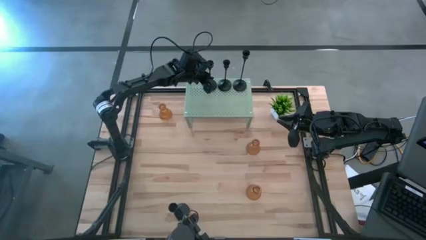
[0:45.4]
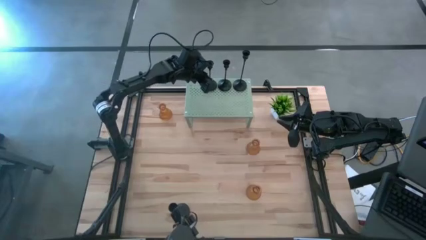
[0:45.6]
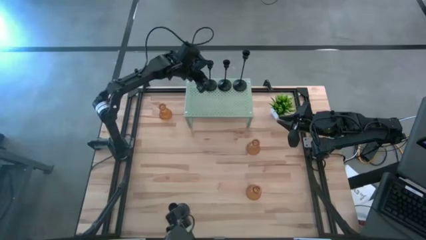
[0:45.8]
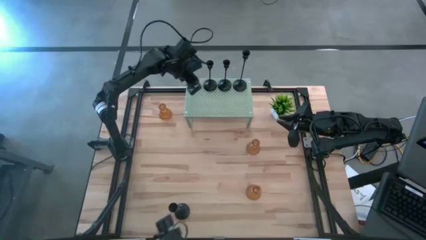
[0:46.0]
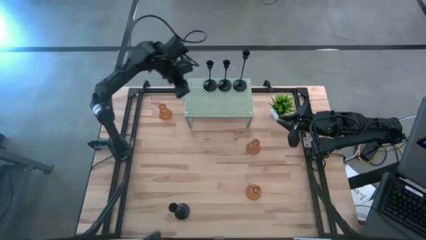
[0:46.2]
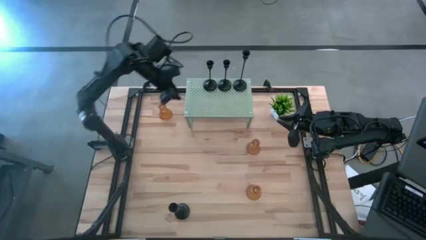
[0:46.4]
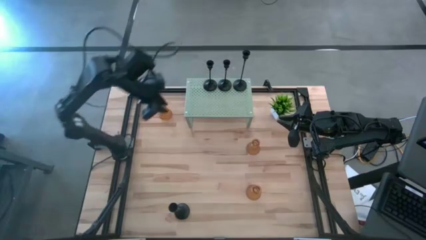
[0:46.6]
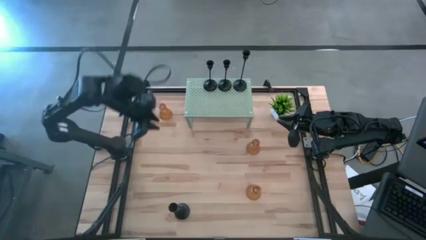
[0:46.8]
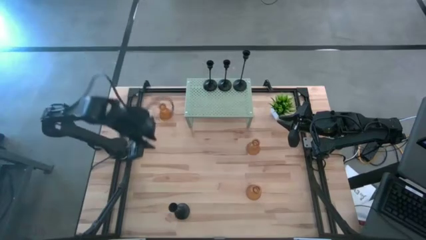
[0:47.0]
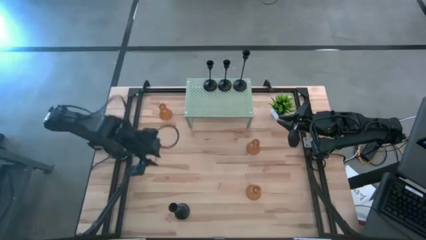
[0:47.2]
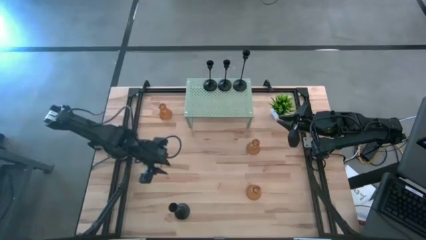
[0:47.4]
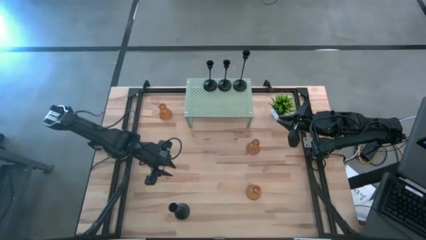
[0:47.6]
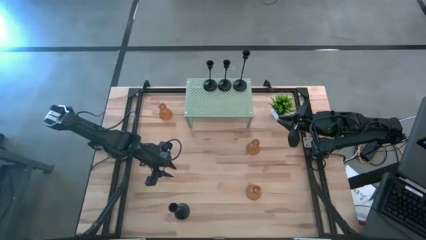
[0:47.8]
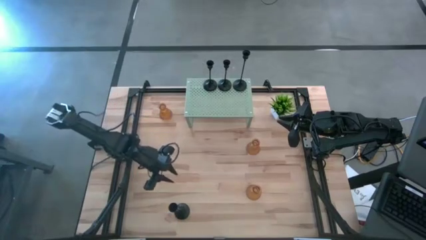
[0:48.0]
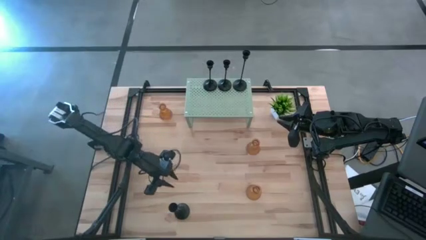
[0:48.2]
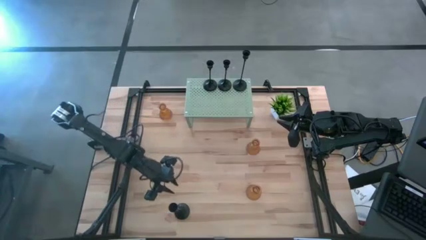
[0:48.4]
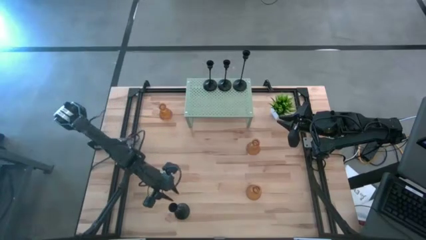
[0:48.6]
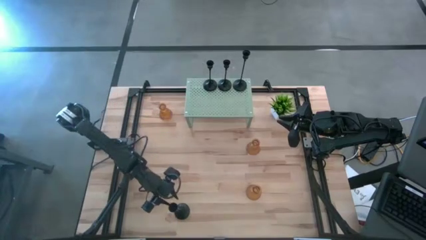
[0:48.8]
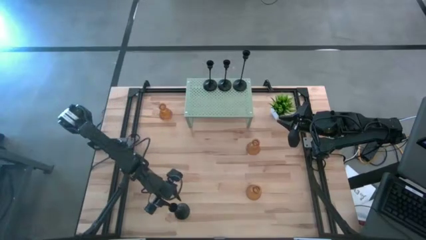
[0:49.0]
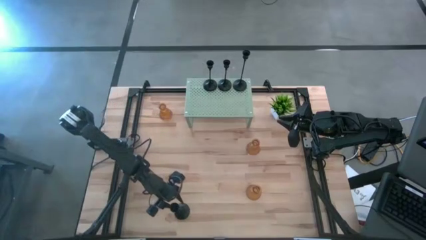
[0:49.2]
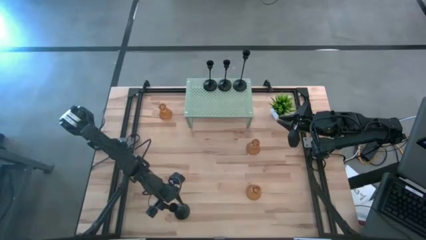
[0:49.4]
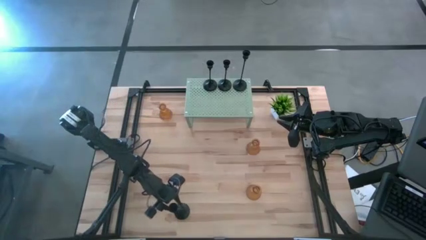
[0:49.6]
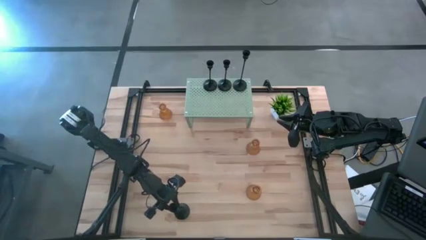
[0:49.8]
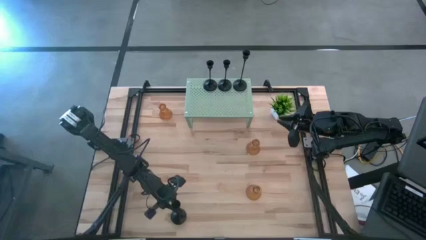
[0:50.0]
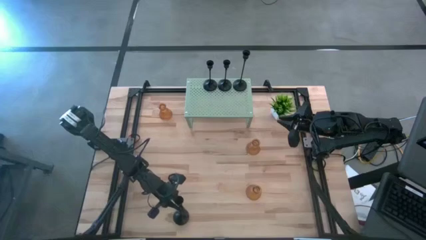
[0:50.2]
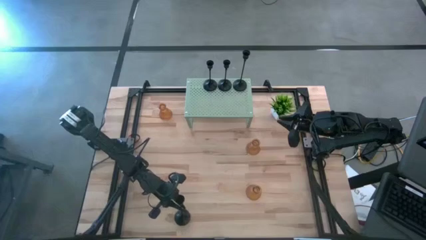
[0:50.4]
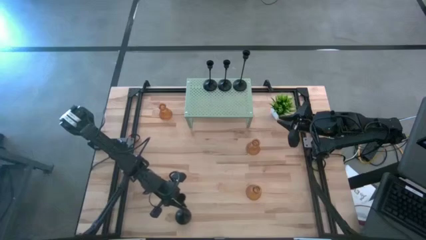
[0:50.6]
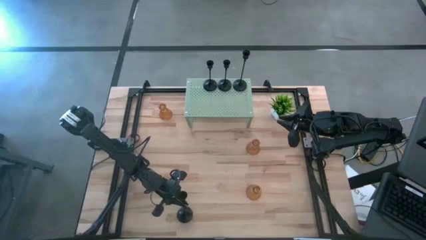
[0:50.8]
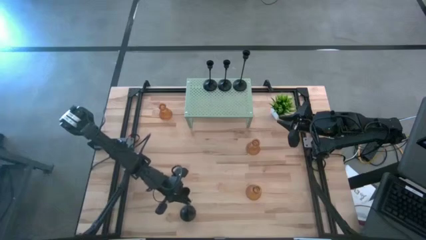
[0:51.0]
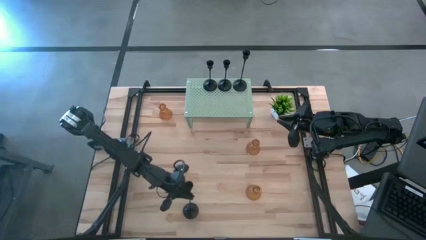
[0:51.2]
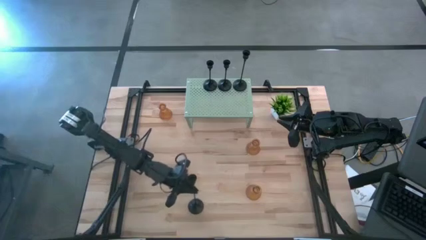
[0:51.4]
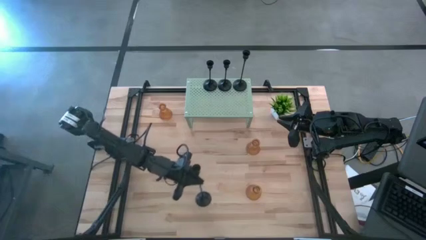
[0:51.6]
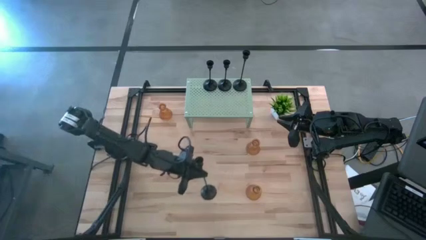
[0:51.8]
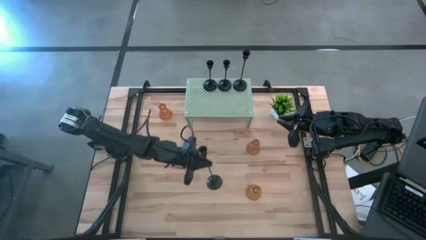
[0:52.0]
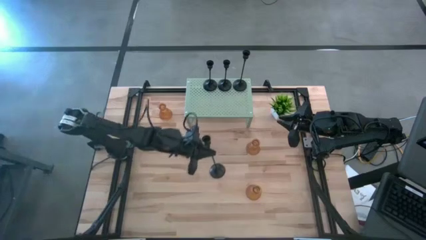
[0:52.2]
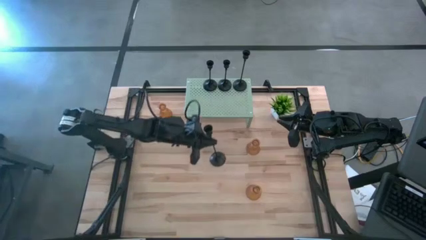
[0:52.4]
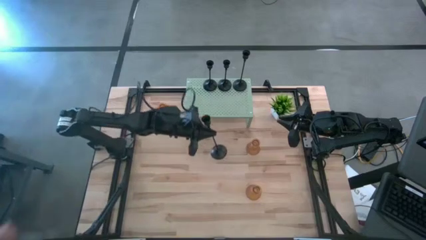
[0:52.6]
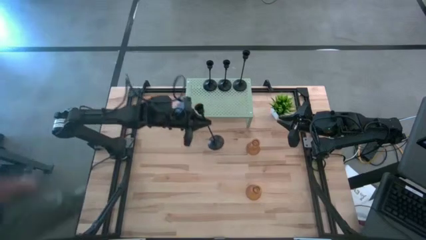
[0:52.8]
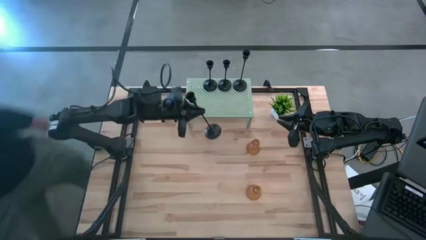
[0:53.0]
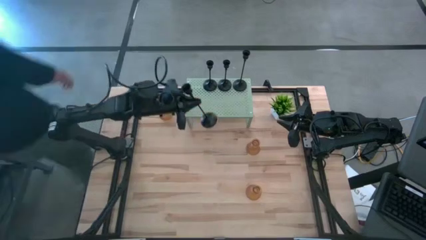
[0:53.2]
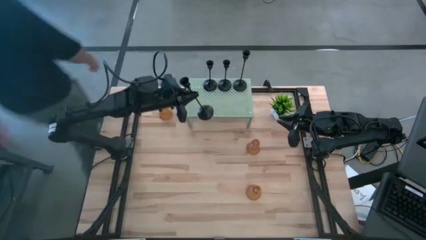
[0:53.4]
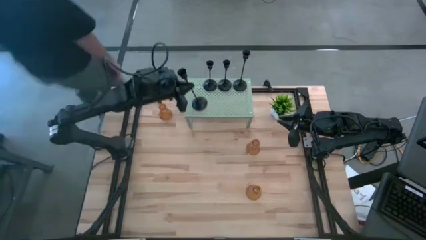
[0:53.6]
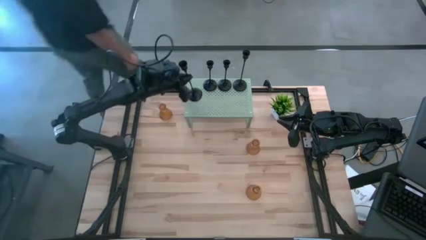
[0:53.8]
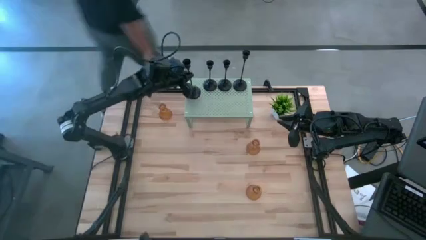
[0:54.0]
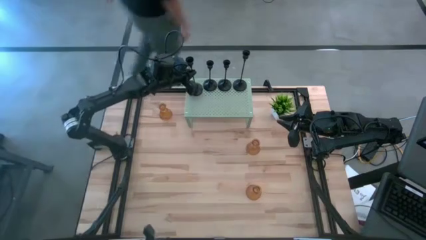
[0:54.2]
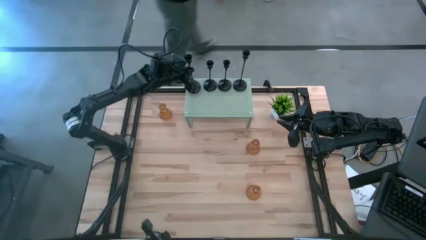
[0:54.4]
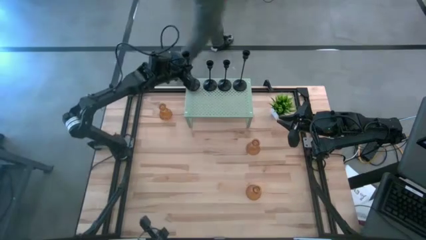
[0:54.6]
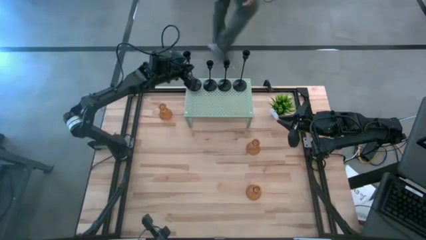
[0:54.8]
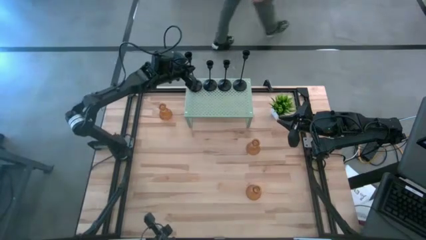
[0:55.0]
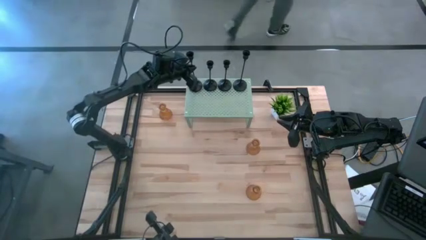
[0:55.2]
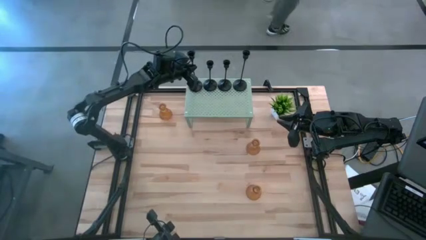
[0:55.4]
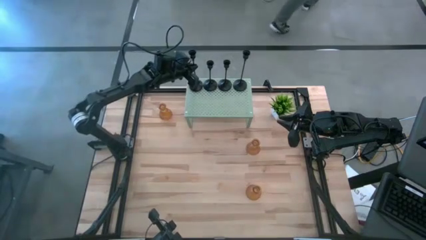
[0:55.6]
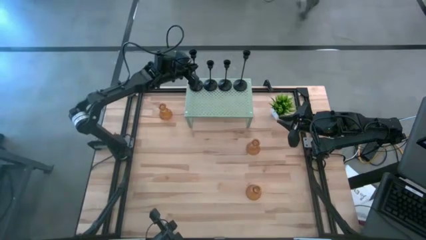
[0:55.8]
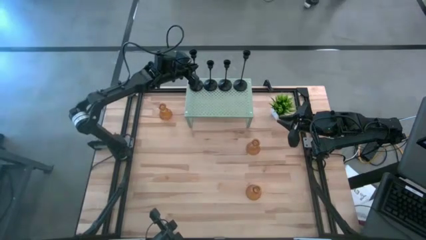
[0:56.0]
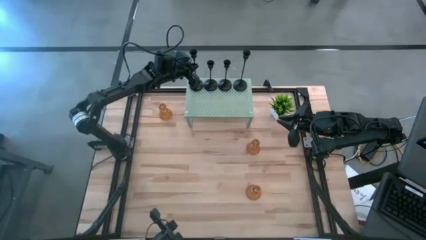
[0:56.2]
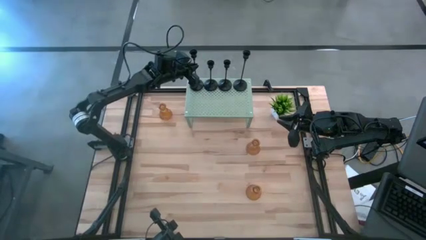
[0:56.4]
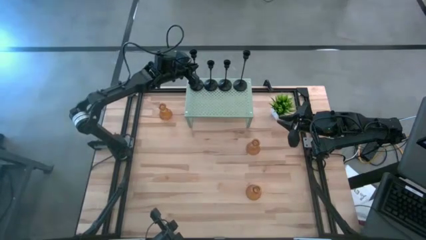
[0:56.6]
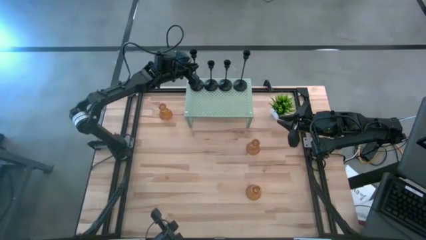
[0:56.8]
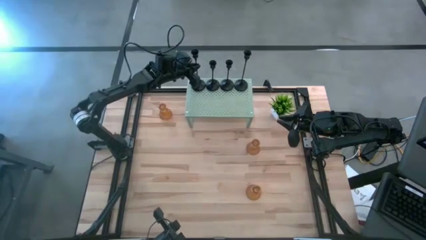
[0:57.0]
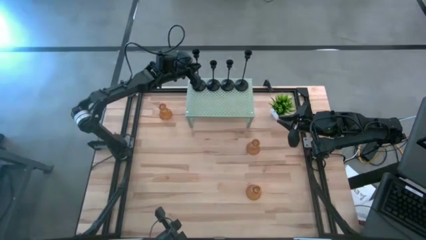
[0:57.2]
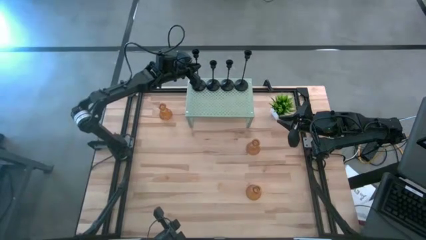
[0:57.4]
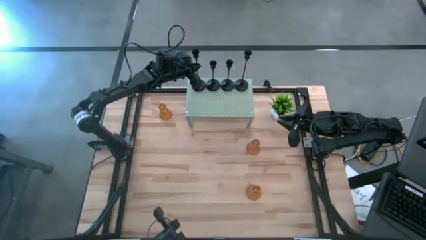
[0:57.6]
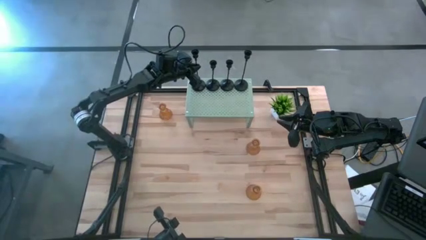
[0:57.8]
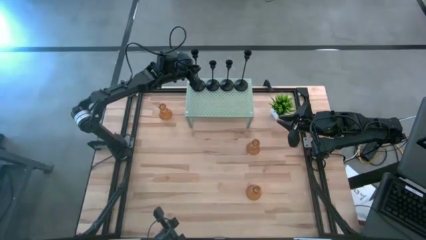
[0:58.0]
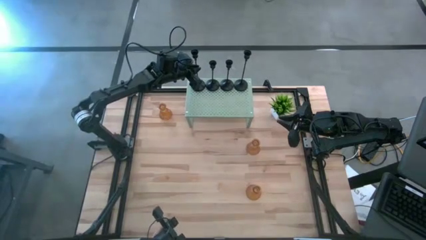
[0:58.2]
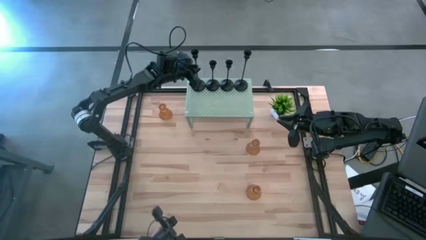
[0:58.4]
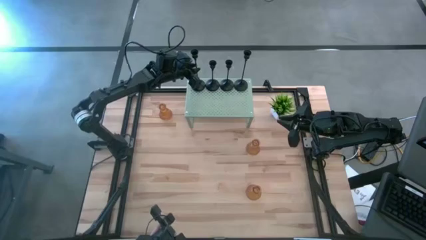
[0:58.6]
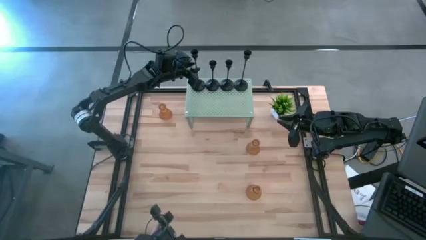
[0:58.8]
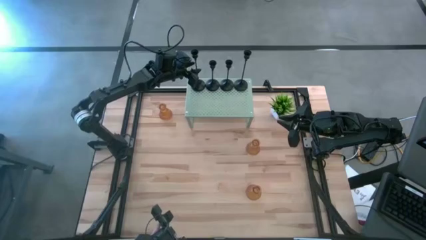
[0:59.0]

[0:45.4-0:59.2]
Task: Pick & Place candle stick holders
Put the black candle holder on the shelf aligned with the other black candle holders

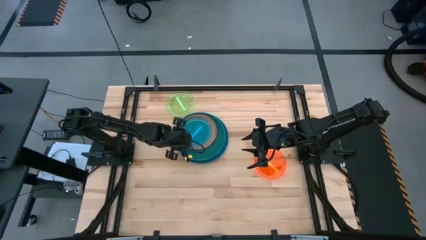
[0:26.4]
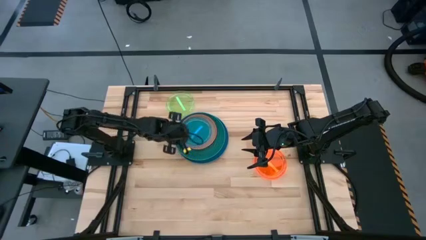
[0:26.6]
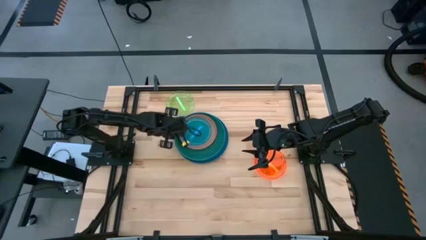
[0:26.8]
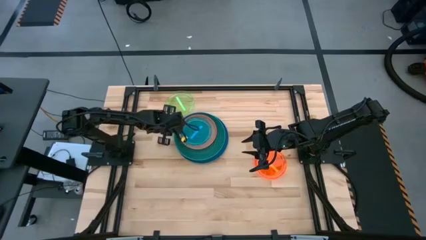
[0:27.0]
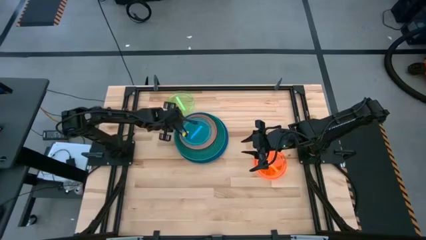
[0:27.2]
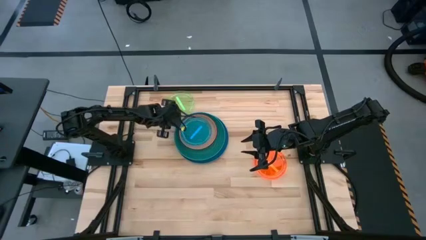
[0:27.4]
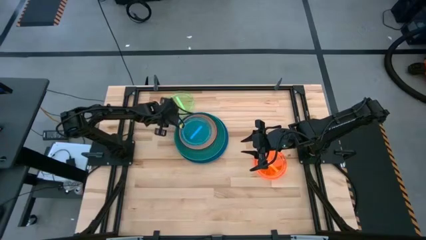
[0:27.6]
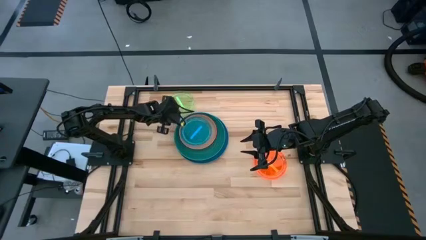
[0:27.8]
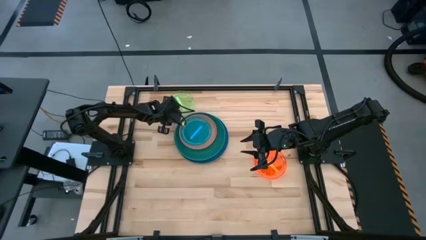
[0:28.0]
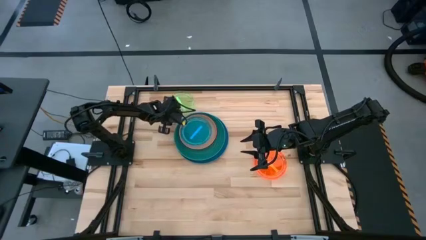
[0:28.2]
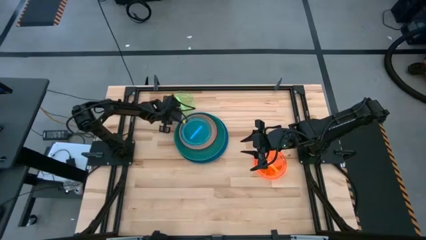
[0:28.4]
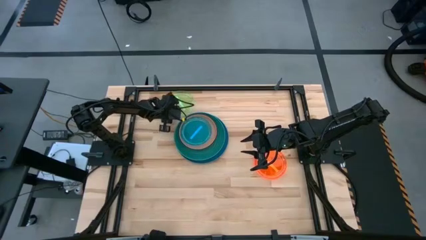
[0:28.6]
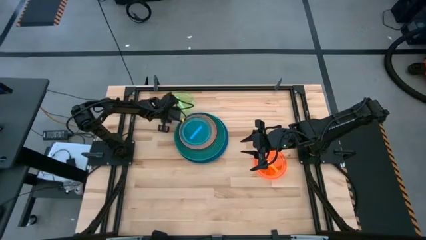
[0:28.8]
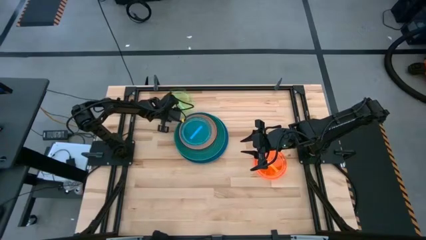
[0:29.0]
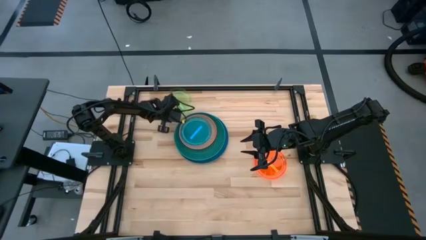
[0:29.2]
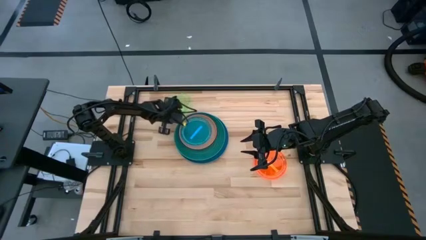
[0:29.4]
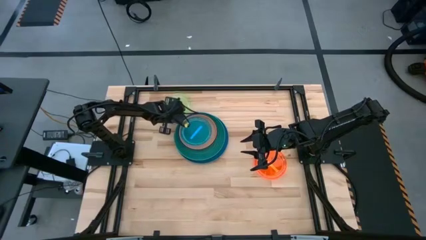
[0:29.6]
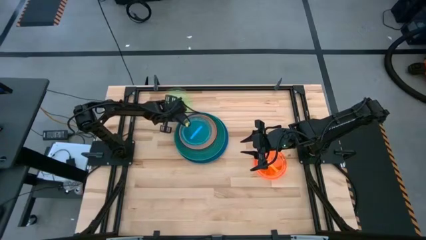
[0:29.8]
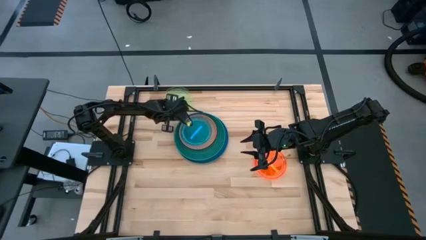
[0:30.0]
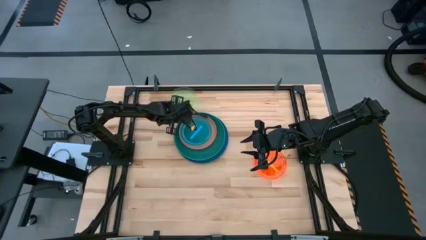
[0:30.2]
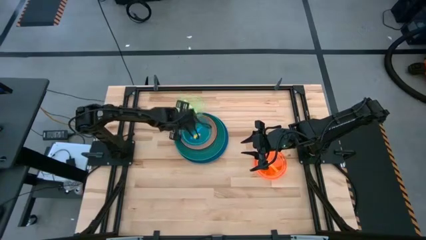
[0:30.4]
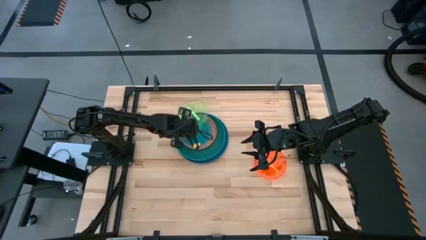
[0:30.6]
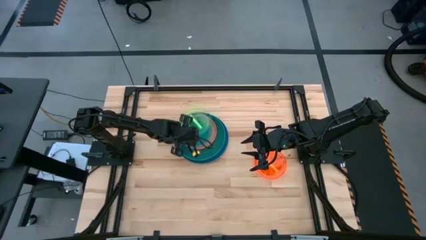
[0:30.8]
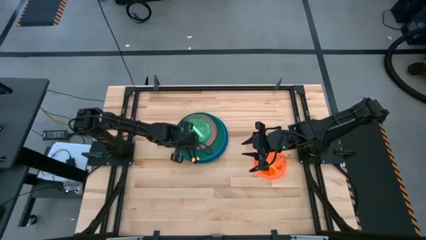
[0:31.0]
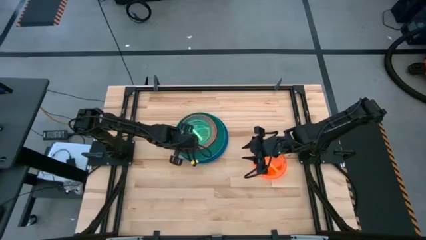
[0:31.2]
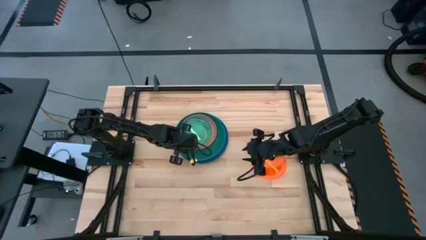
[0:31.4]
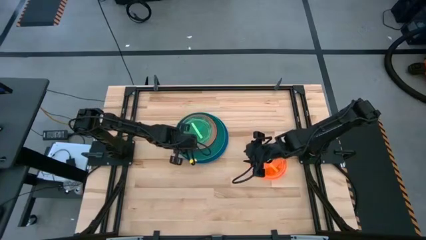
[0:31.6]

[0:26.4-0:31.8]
Task: Stack plastic plates
Stack the transparent light green plate on top of the transparent light blue plate
